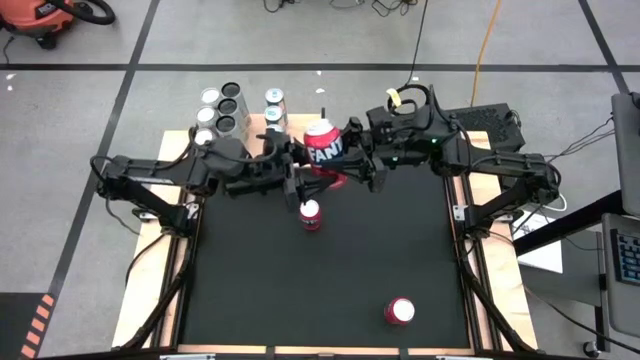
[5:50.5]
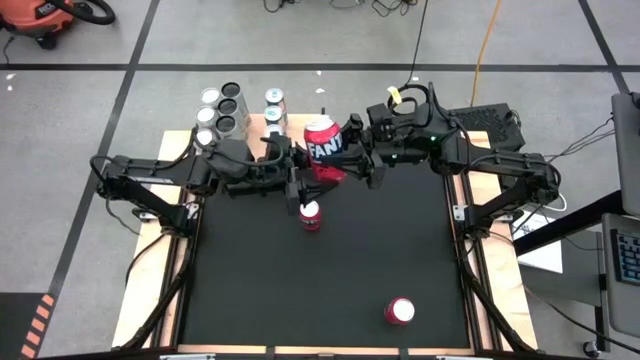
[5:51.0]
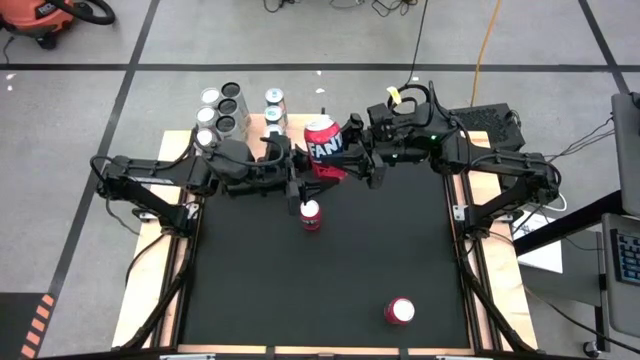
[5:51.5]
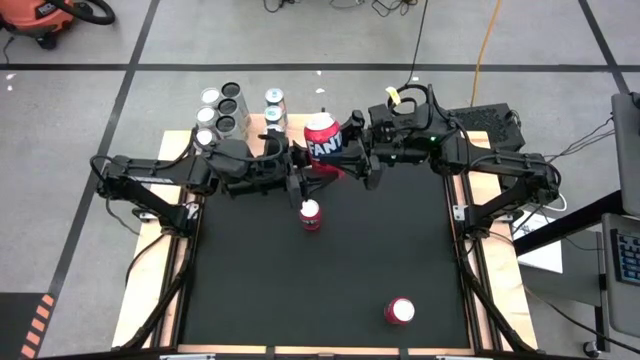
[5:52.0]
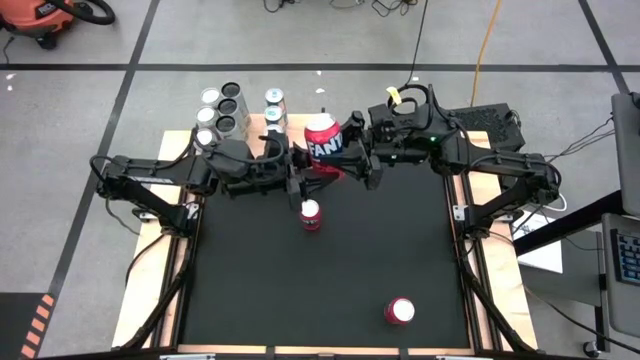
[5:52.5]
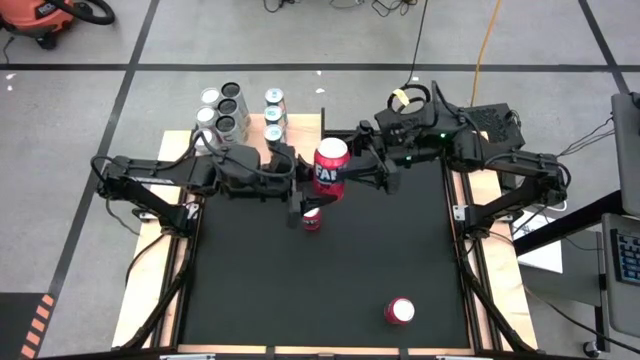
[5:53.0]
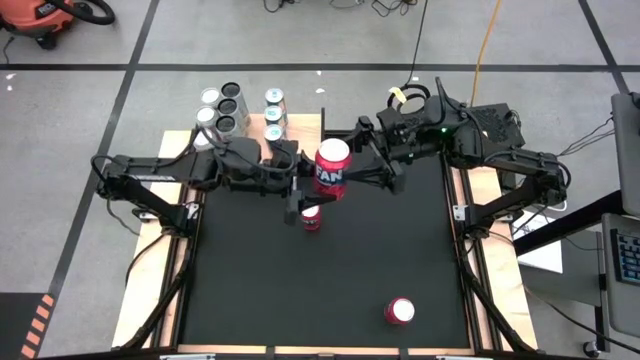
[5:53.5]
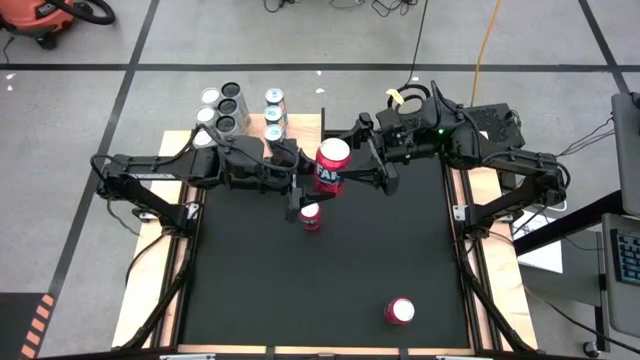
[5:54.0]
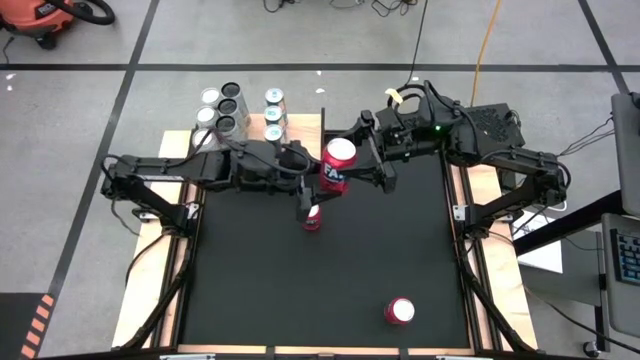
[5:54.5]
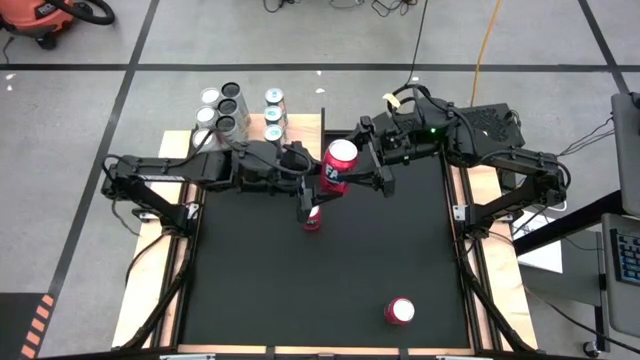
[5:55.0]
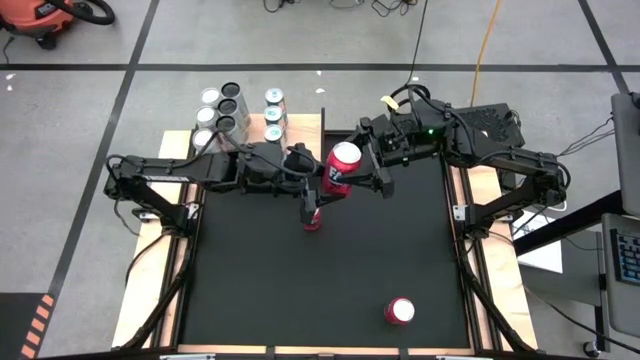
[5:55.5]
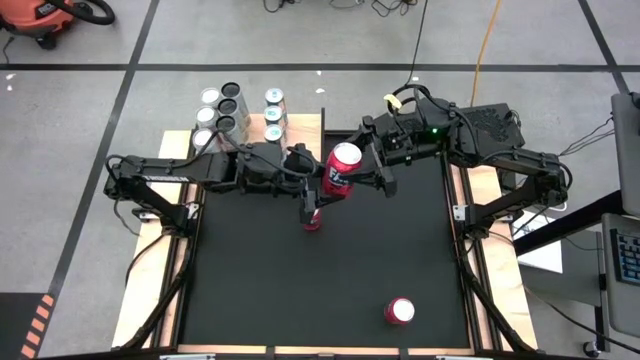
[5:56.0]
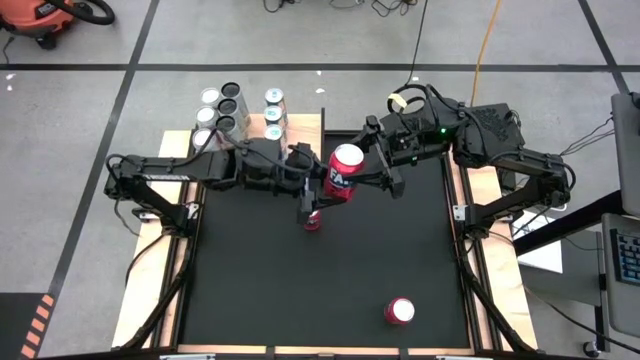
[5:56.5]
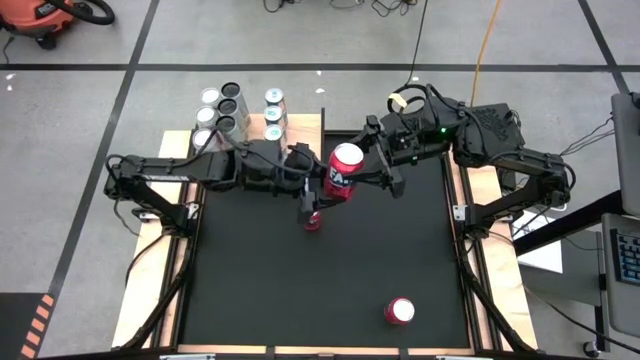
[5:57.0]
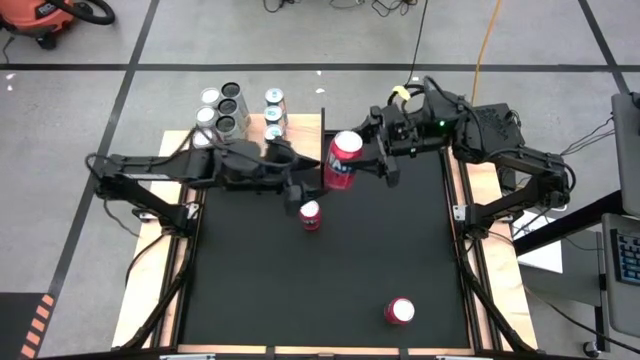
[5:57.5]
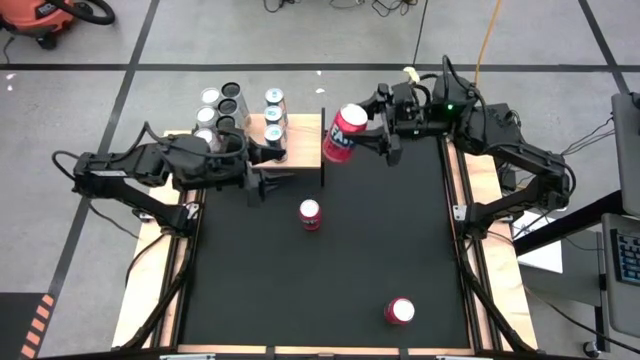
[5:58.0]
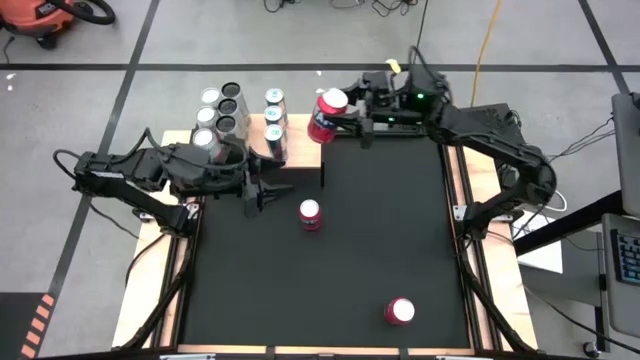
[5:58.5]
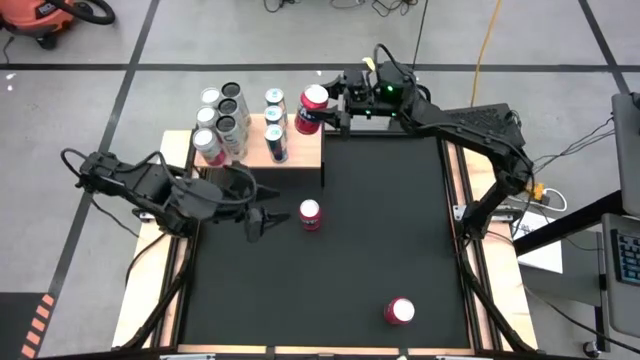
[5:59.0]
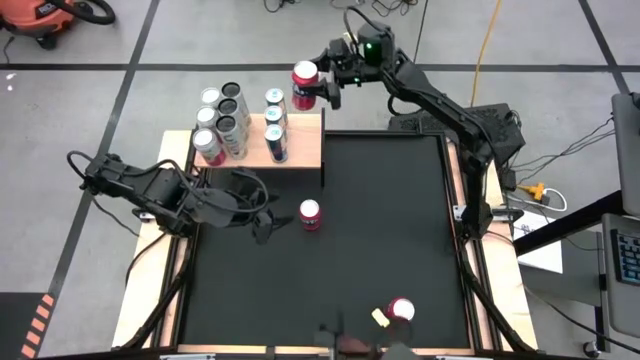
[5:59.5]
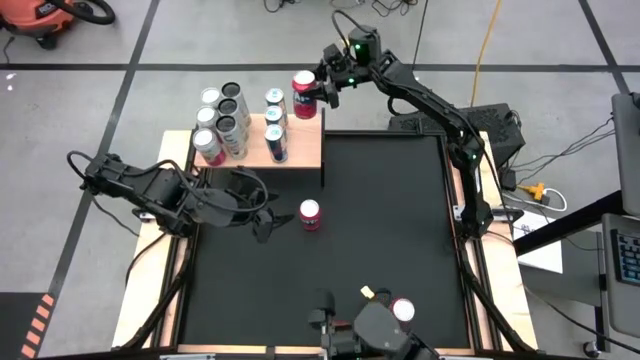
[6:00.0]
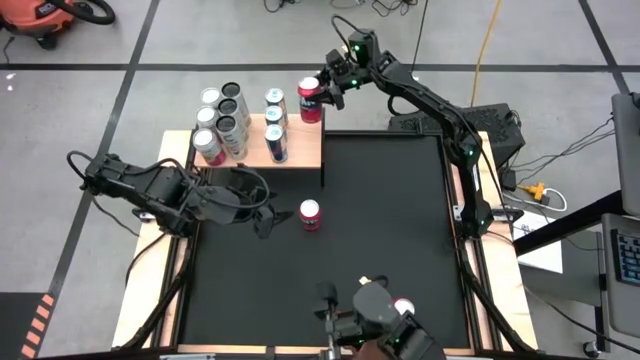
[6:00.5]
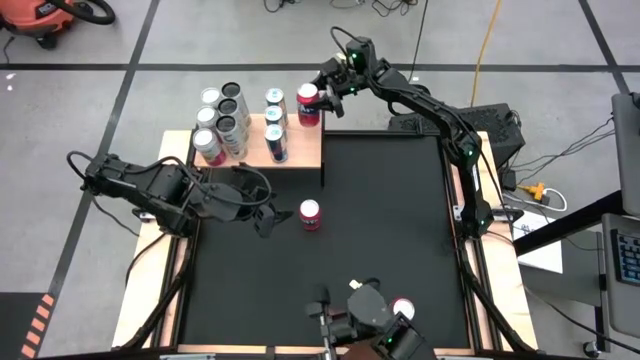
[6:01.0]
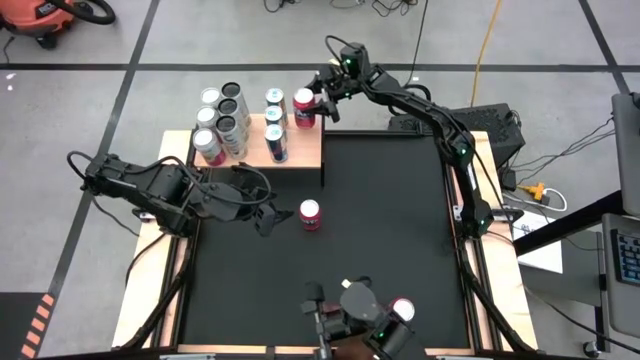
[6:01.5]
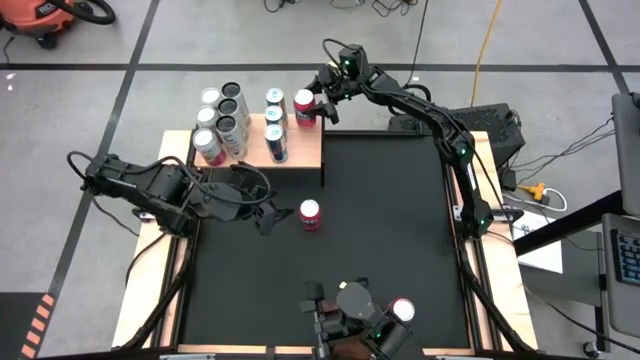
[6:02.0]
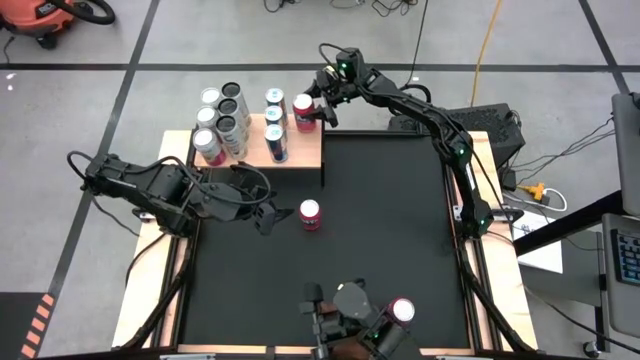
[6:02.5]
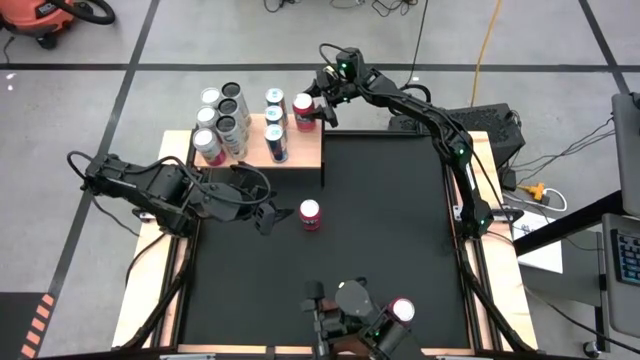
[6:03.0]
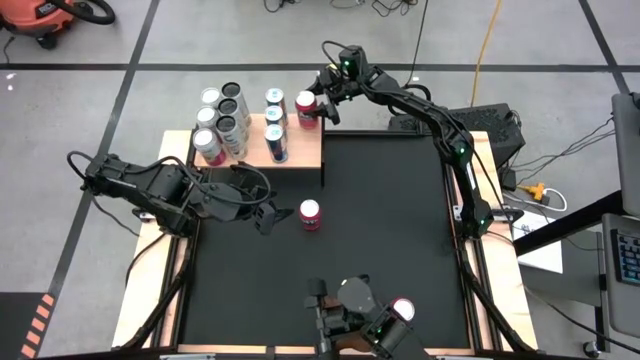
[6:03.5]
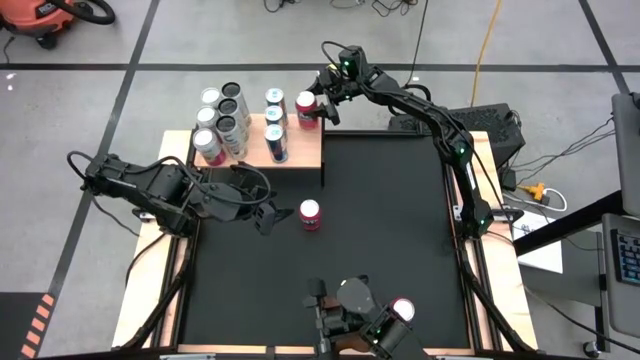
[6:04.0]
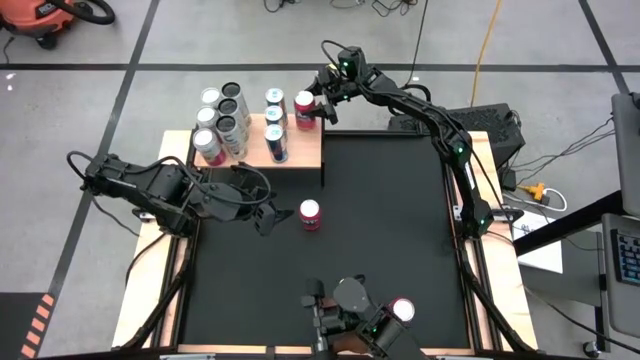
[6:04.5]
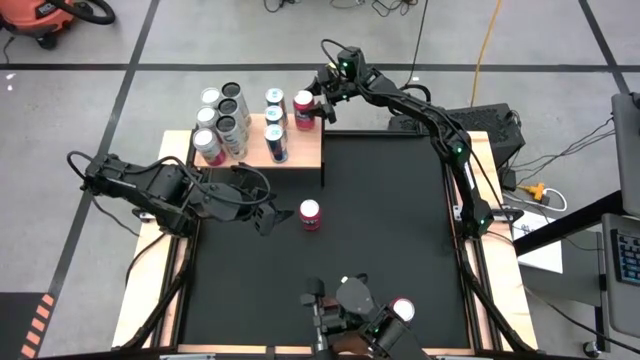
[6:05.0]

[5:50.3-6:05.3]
Task: Place canned beverage on shelf
Put the bottom left red soda can on the shelf

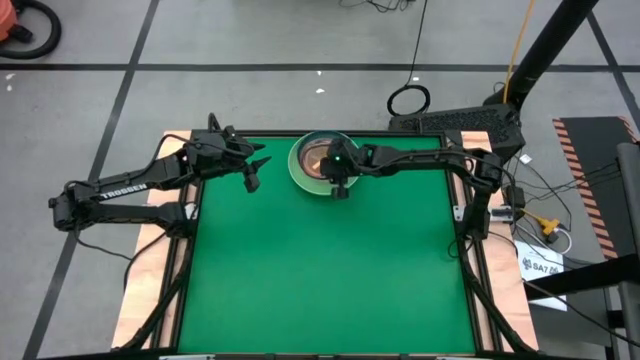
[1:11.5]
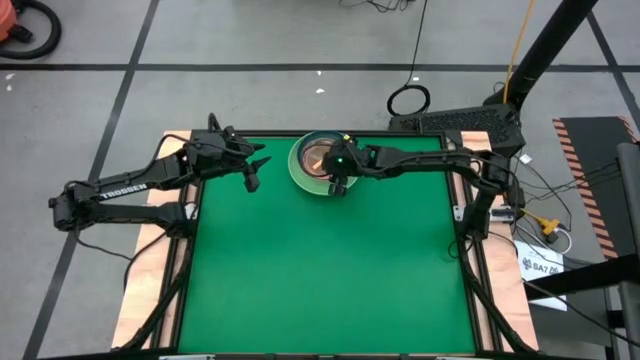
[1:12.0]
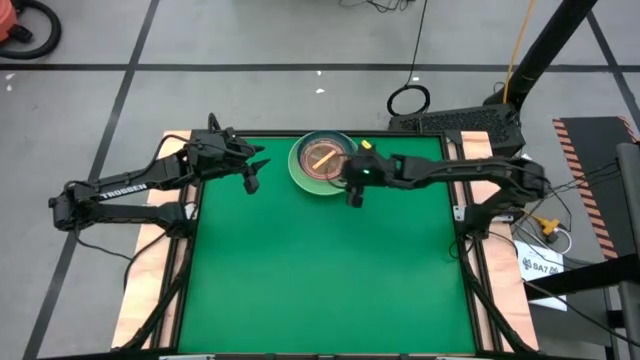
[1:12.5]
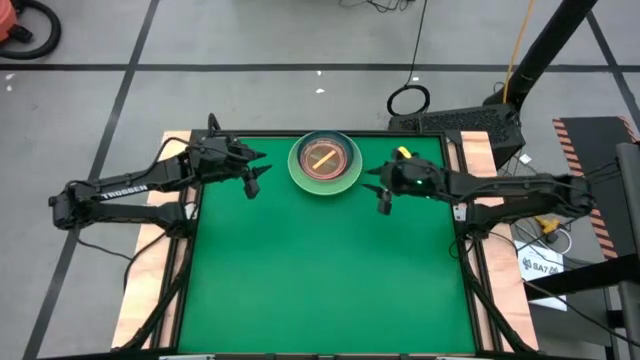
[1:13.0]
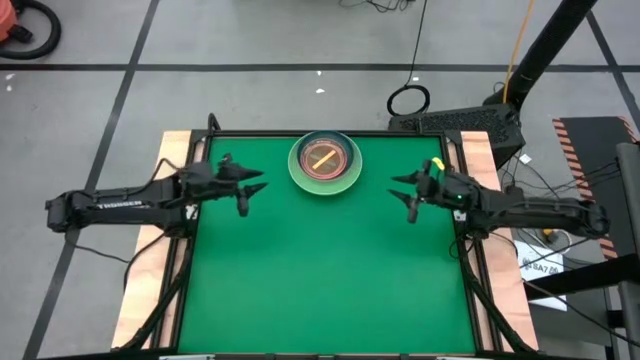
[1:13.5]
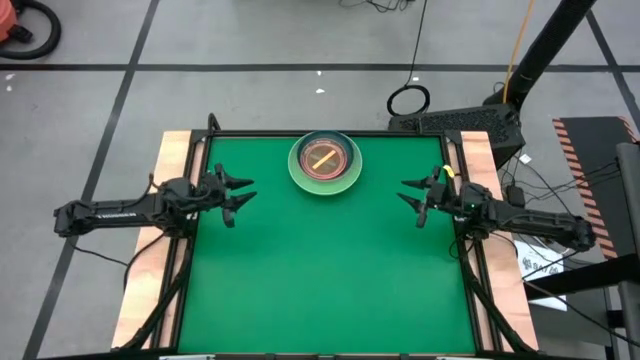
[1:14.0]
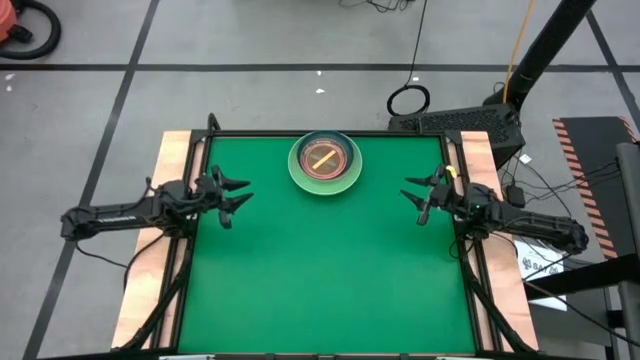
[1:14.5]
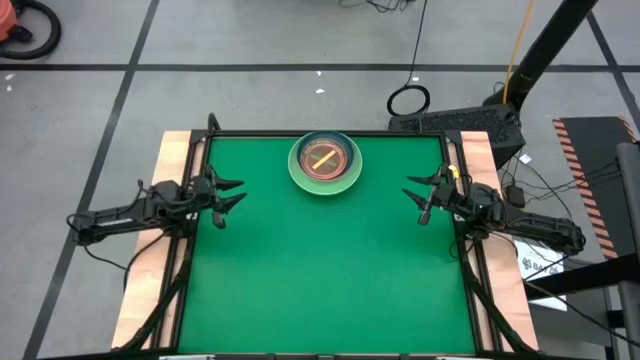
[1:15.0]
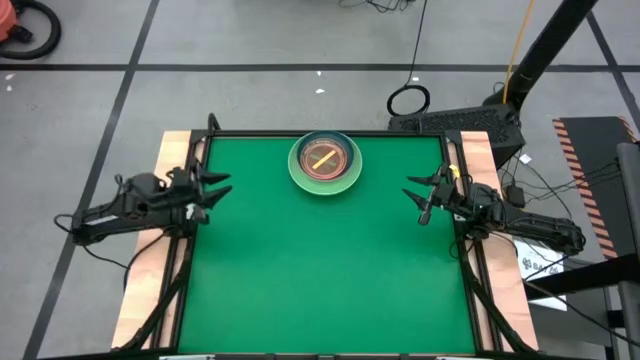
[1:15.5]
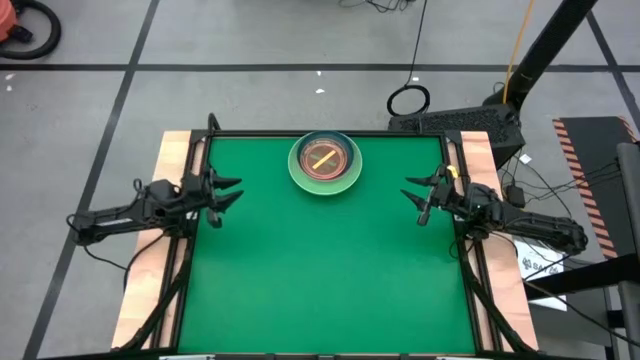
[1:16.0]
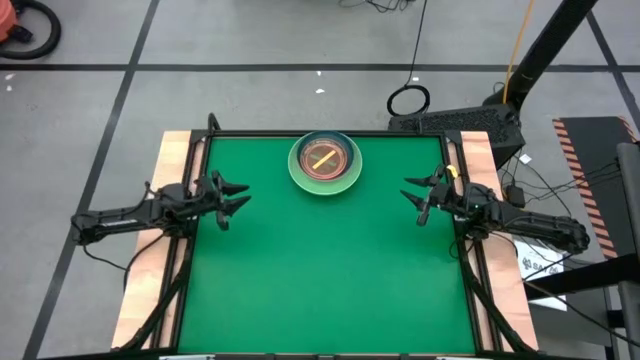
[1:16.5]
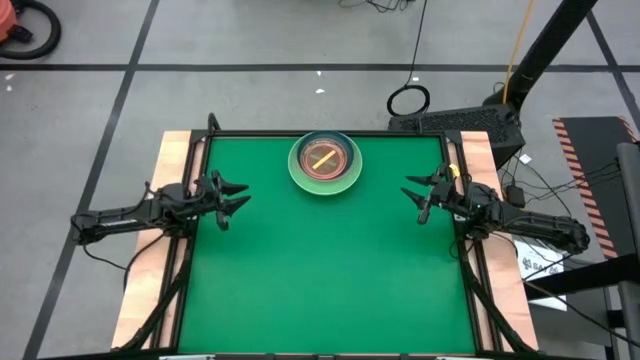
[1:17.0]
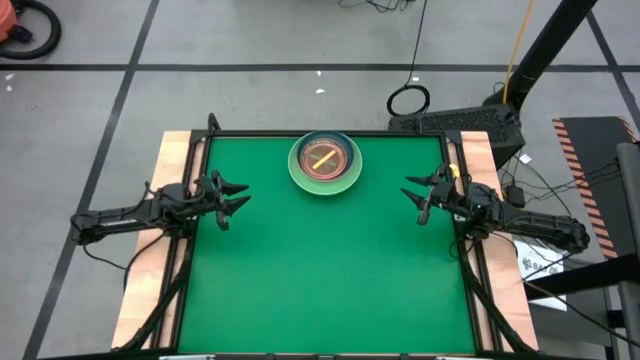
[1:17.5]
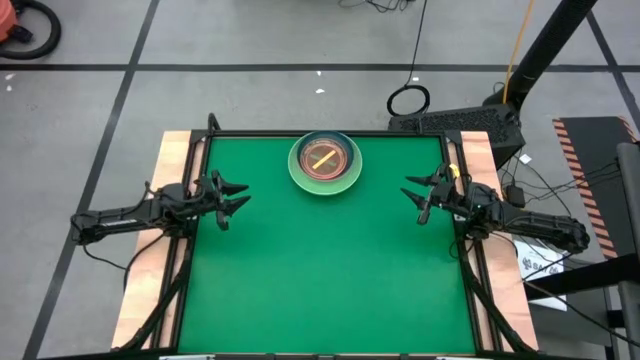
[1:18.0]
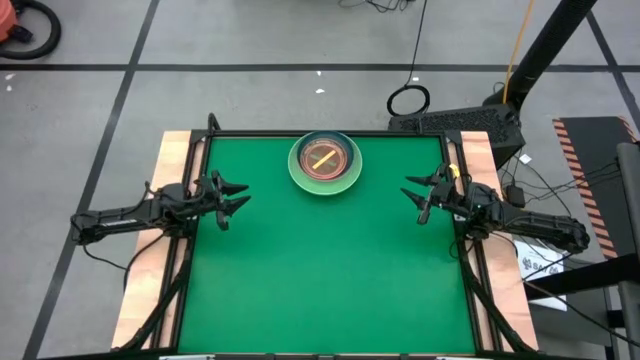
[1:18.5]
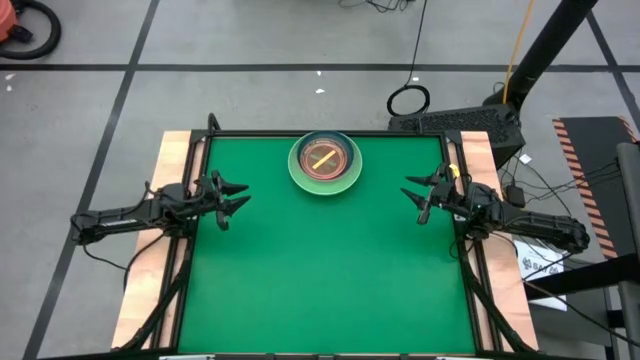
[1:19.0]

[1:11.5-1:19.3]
Task: Stack plastic plates
Return to Home Position
